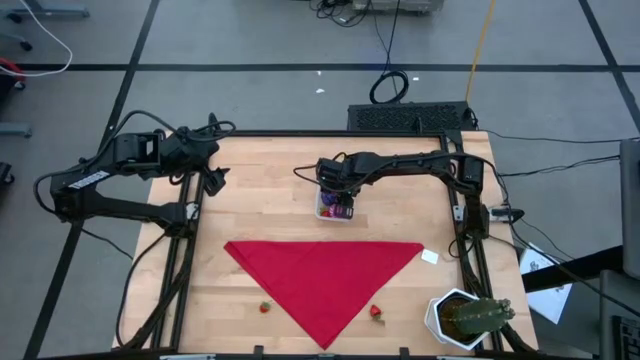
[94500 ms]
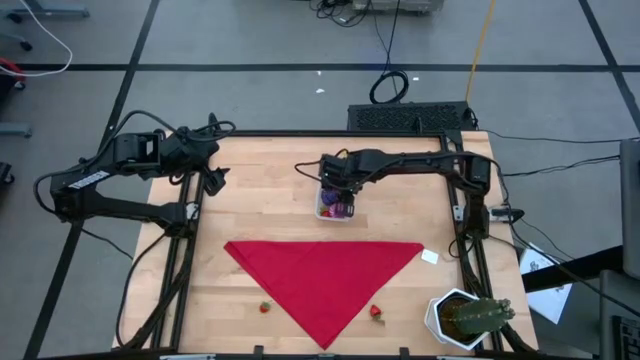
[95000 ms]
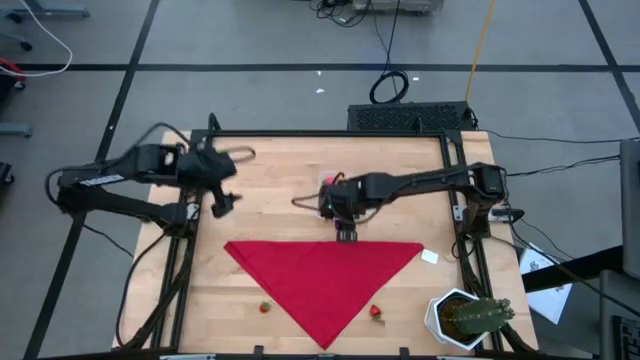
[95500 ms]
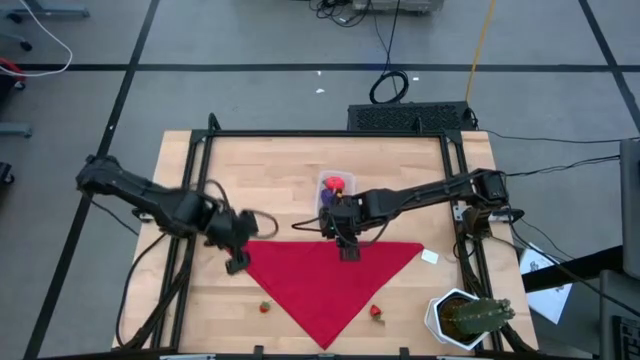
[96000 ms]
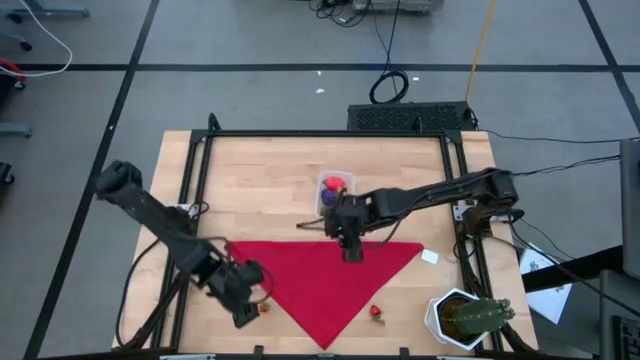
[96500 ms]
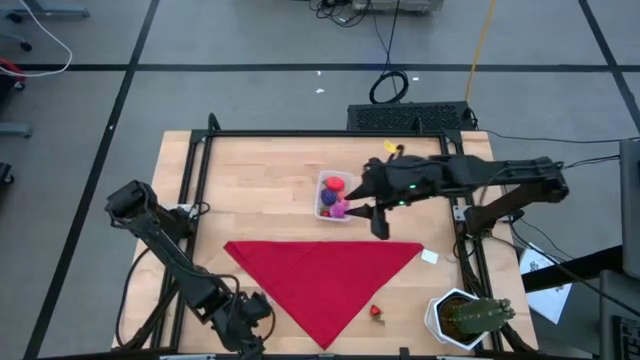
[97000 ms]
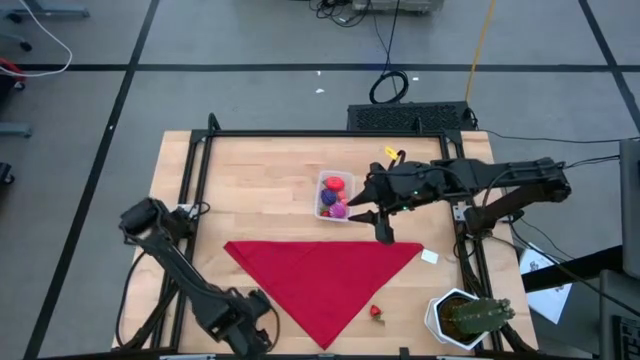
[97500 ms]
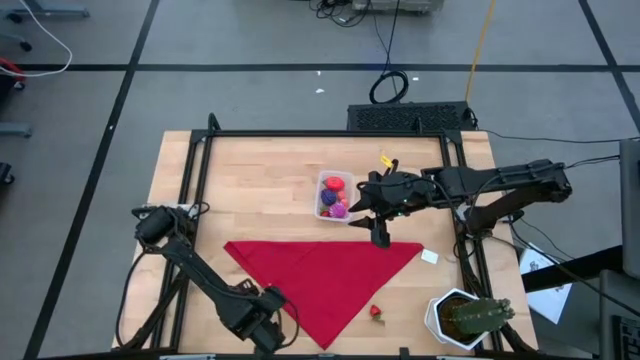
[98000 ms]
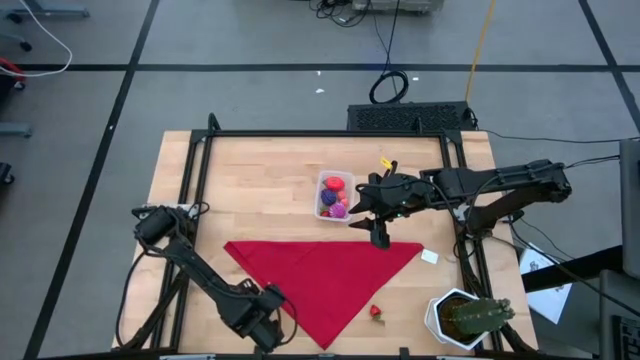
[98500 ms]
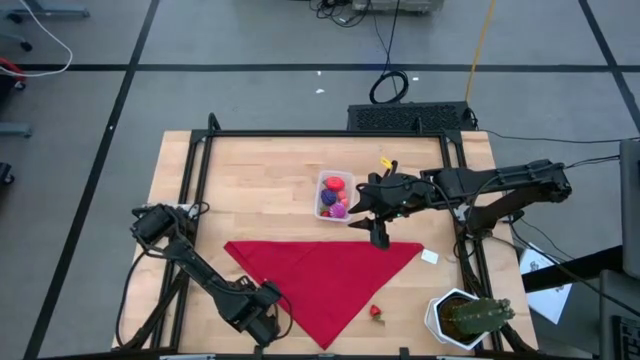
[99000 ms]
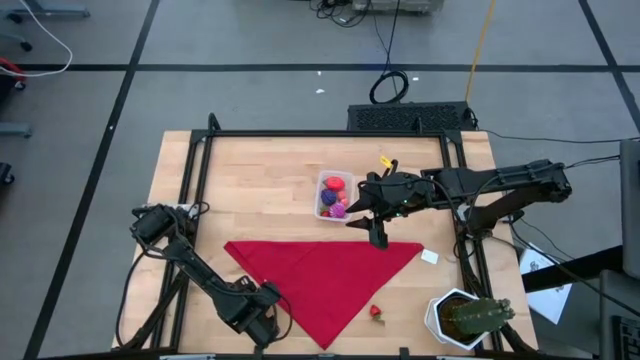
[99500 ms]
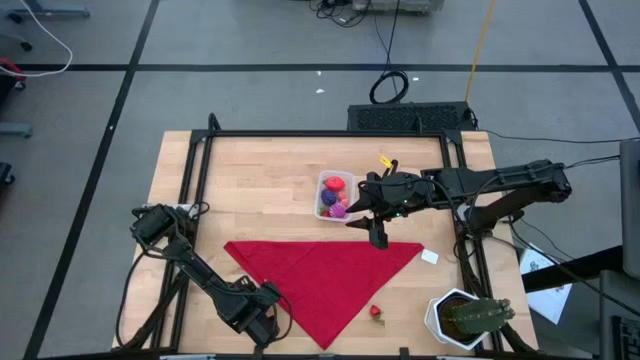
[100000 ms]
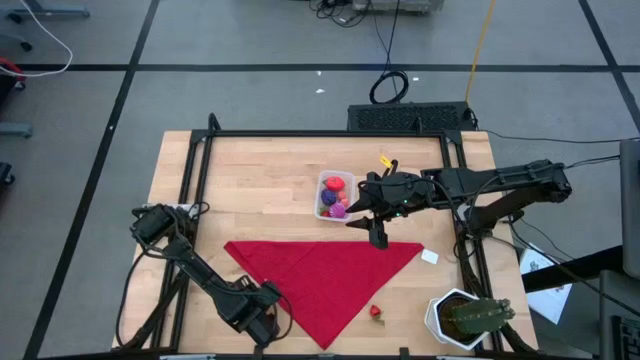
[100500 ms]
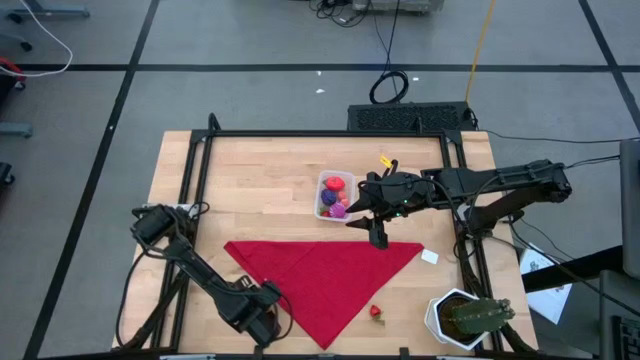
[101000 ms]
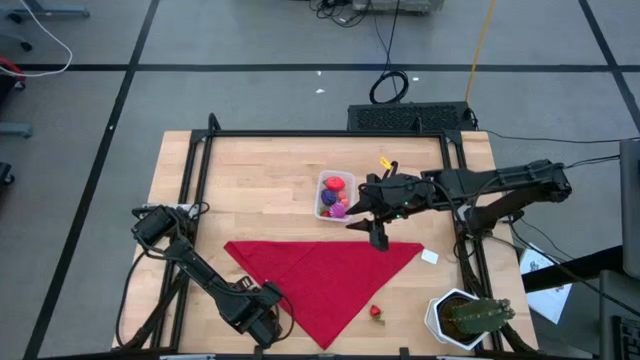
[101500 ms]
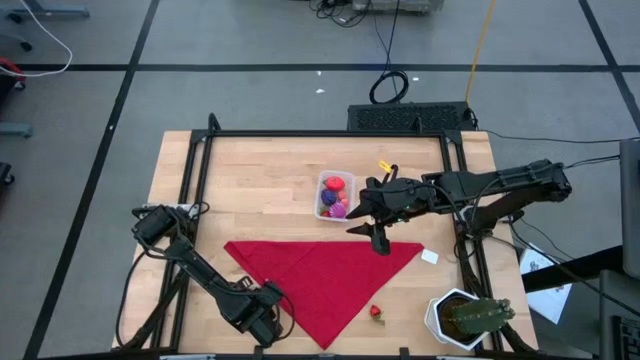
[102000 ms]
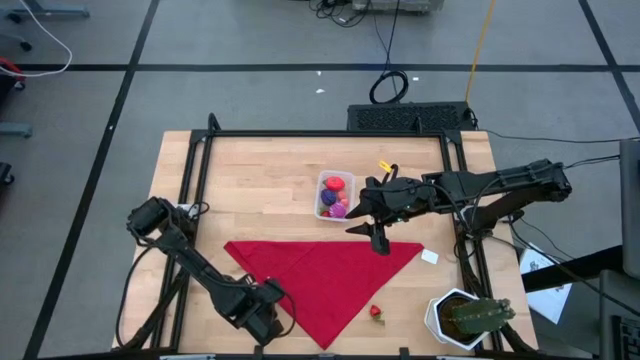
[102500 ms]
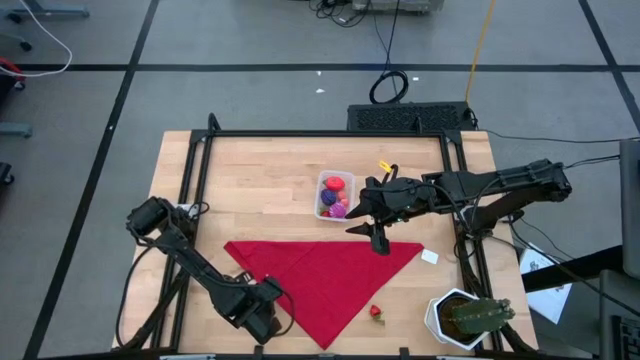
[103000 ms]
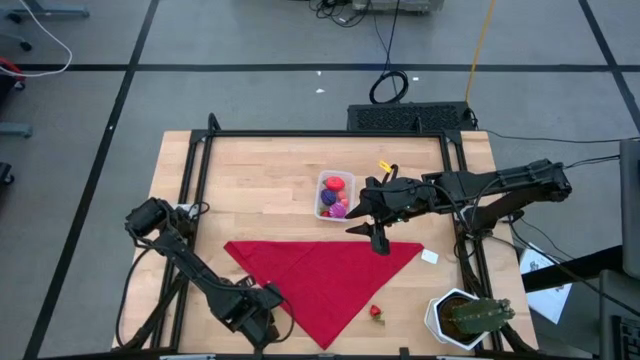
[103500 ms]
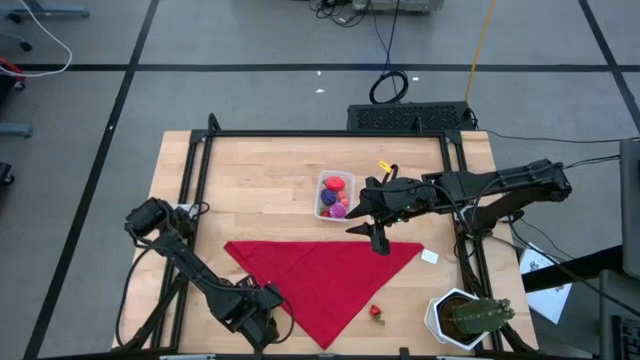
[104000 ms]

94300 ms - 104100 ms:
Task: Pick and placing Produce into tupperware
Put the left red strawberry into the transparent bin

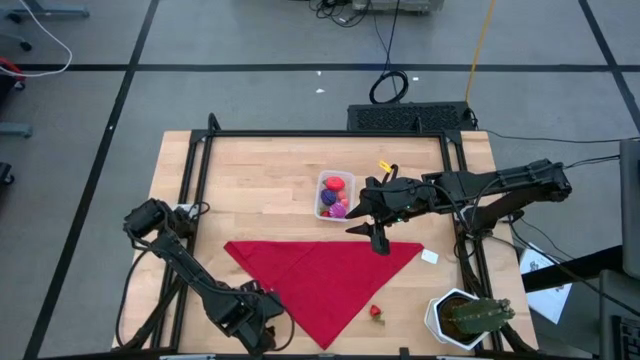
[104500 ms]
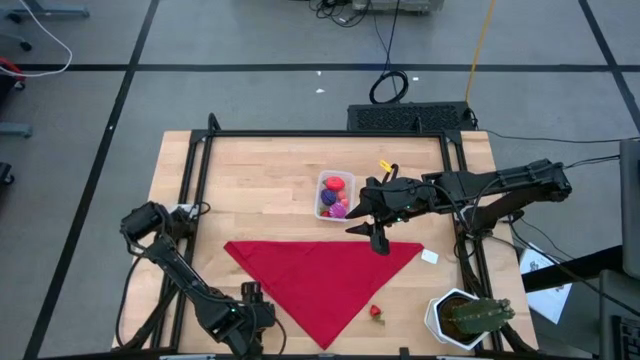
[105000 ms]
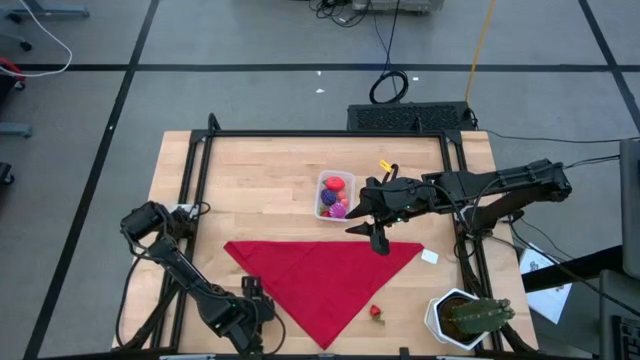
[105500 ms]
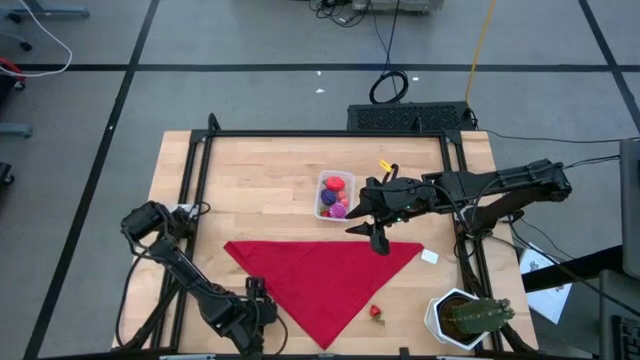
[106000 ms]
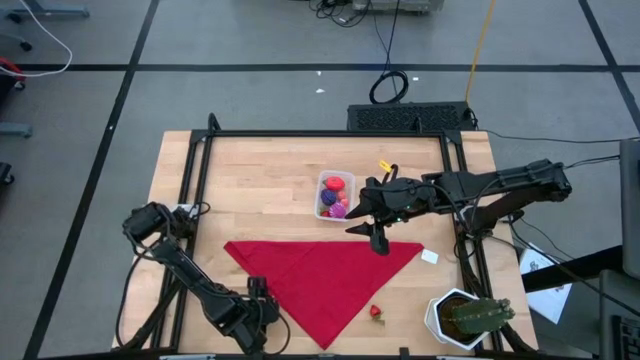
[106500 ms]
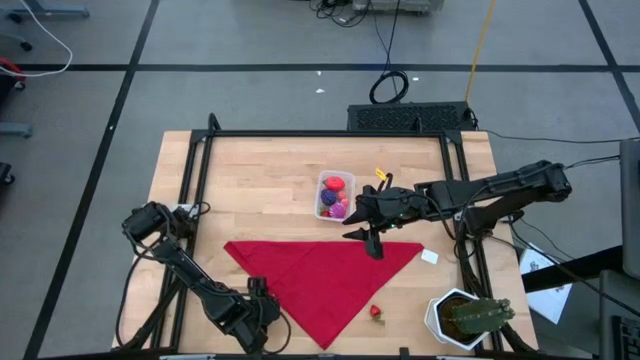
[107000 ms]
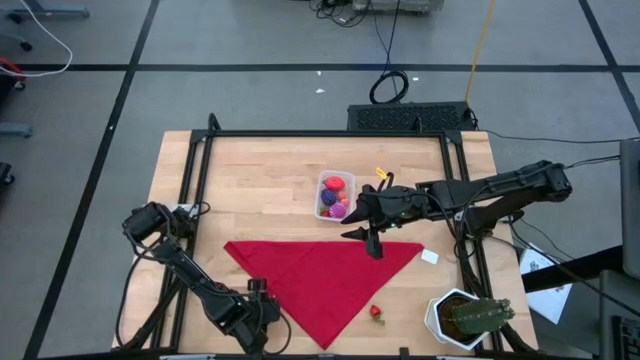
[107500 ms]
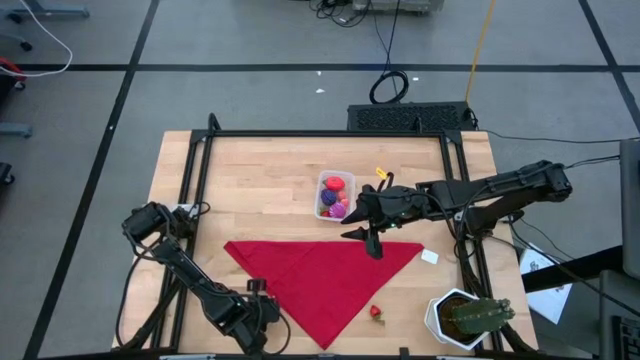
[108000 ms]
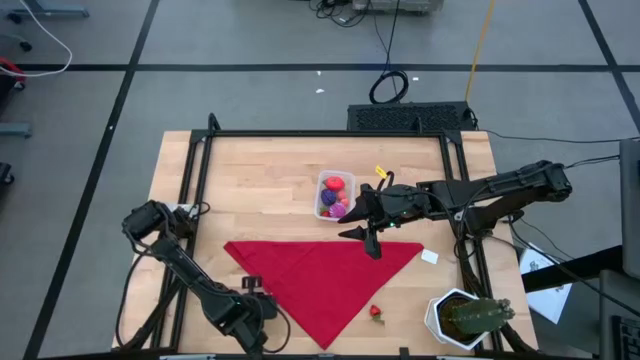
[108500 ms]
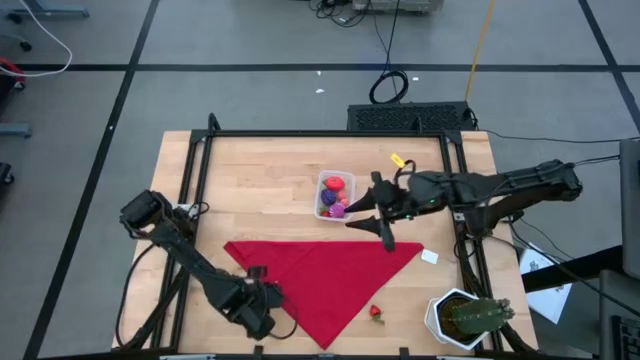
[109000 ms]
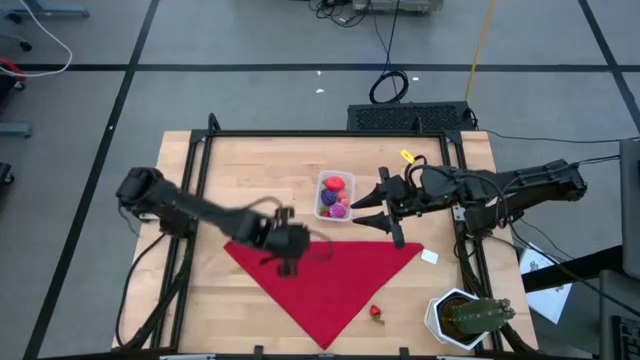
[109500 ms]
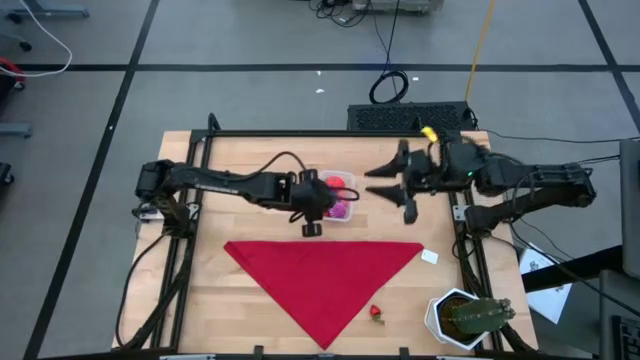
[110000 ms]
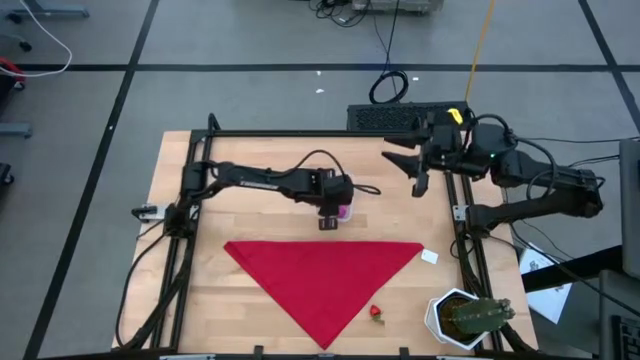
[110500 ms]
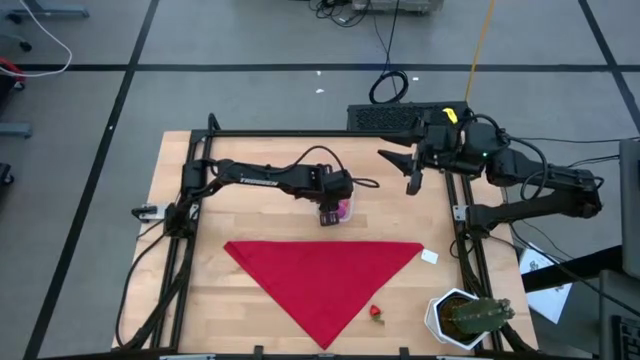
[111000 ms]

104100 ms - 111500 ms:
Put the left red strawberry into the transparent bin

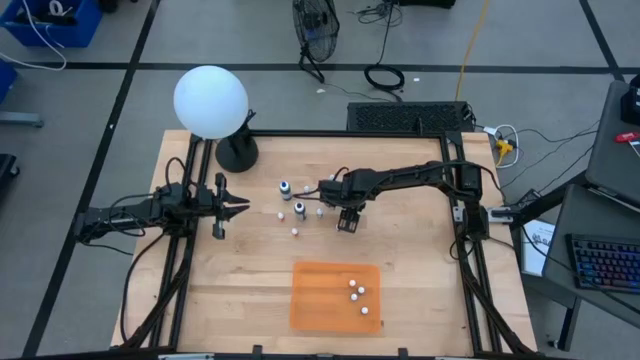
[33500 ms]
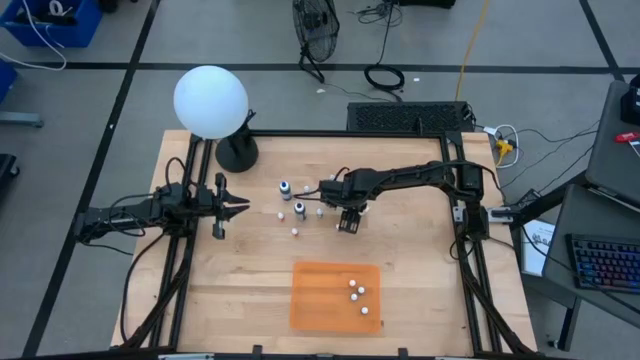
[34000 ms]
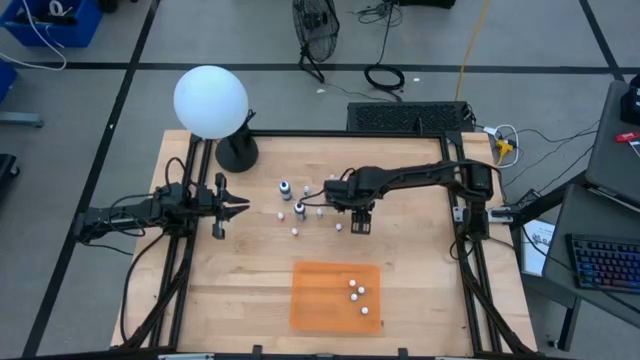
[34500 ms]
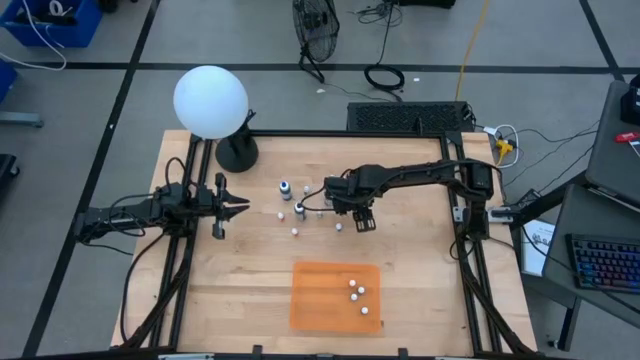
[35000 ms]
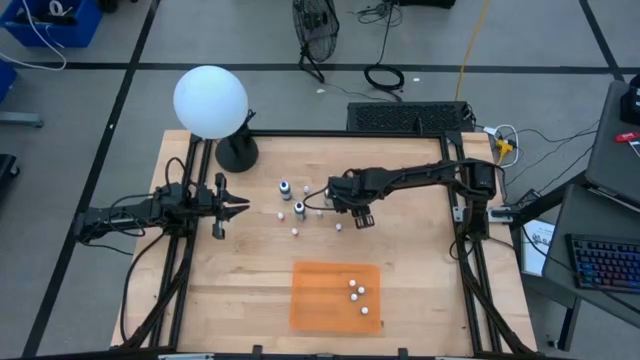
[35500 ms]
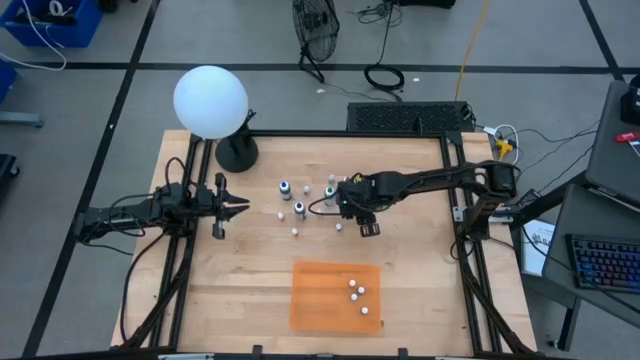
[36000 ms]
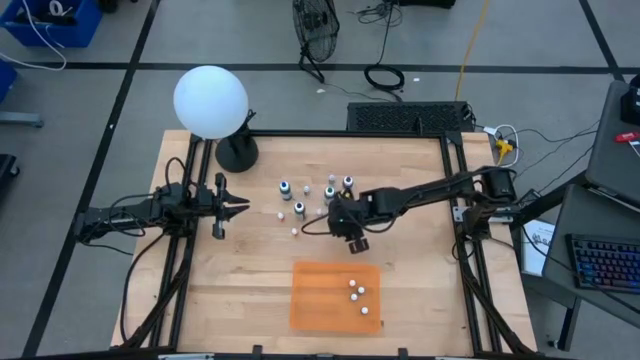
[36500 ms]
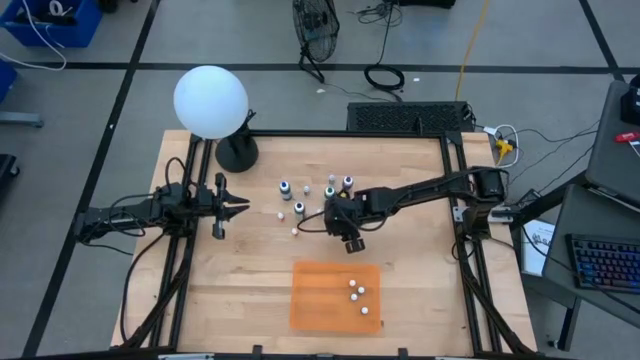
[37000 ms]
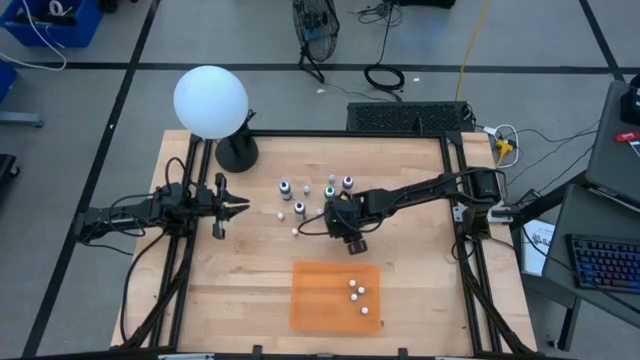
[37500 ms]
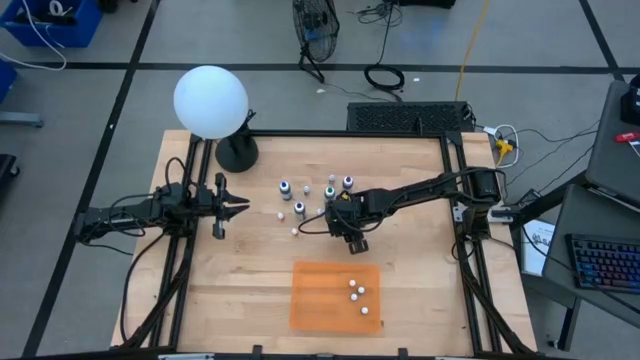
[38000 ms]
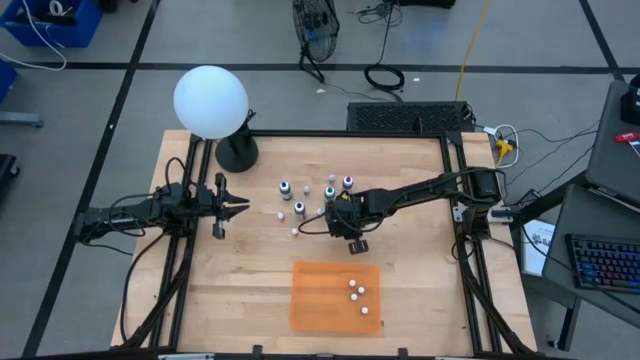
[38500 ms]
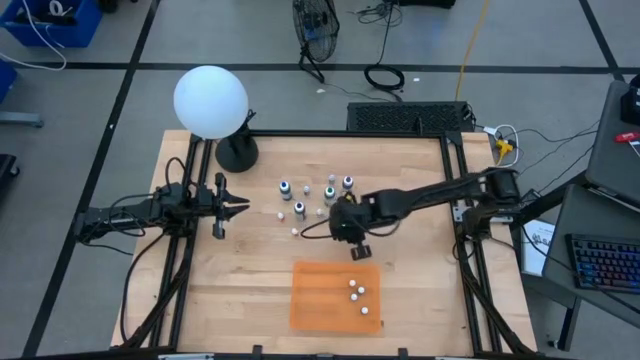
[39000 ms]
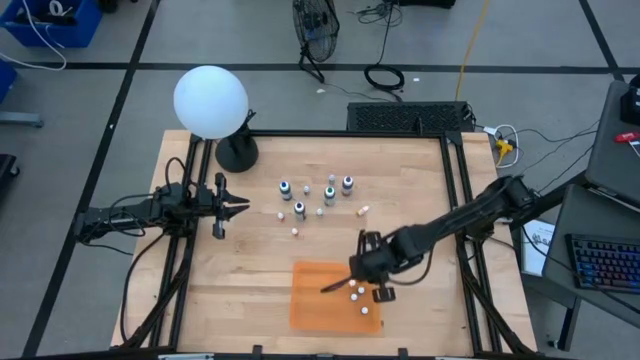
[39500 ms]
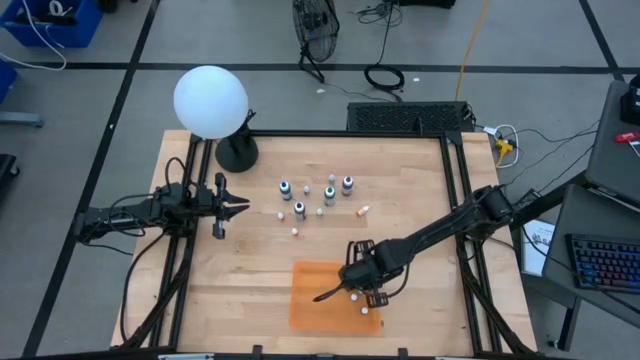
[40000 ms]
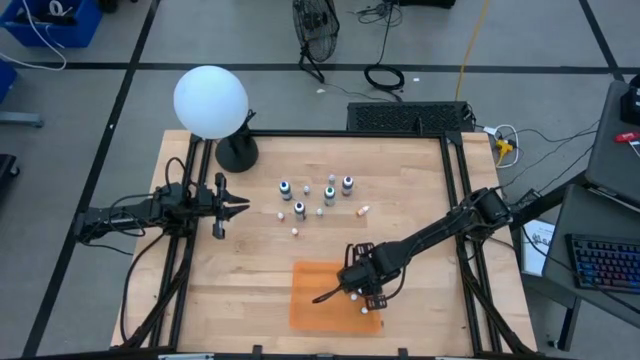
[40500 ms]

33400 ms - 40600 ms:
Task: Pick & Place food coloring
Put the small purple food coloring bottle into the orange container
